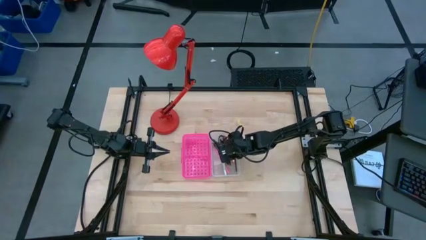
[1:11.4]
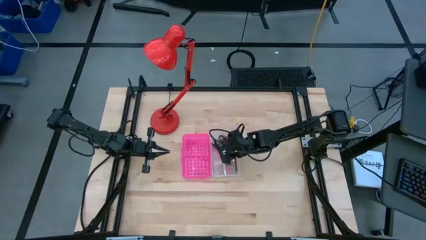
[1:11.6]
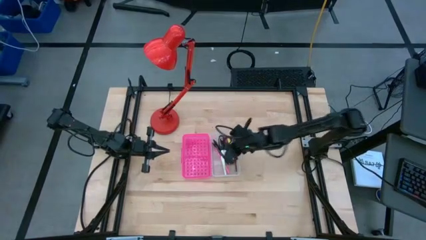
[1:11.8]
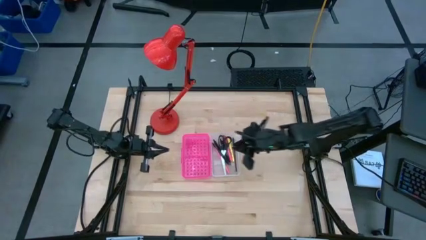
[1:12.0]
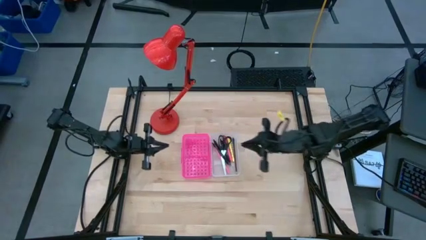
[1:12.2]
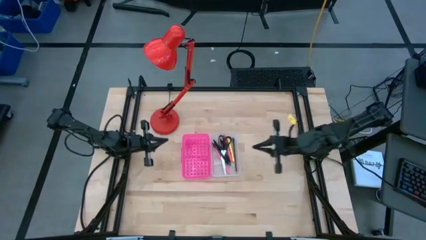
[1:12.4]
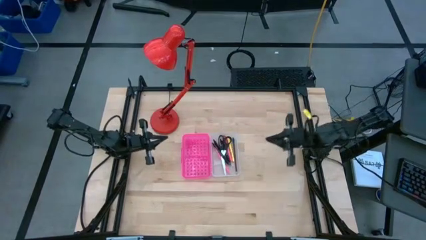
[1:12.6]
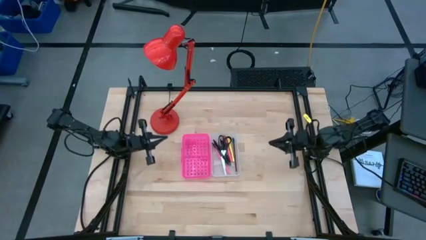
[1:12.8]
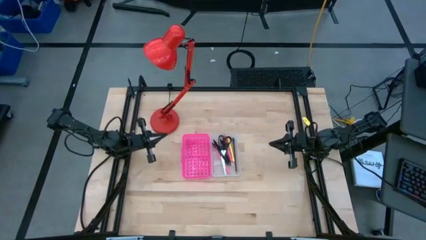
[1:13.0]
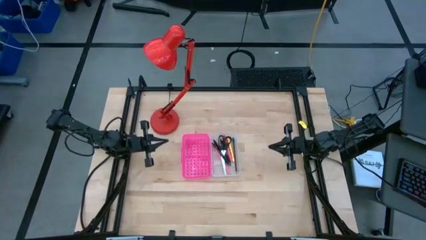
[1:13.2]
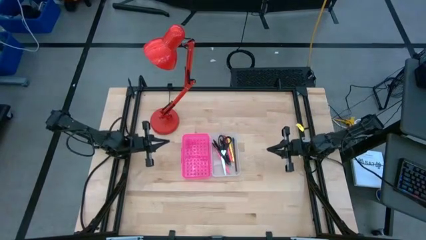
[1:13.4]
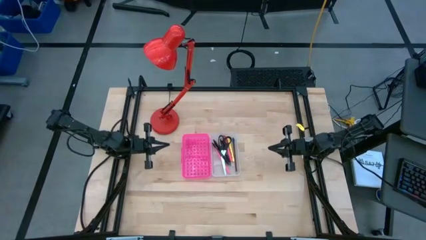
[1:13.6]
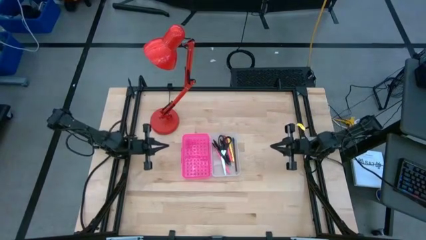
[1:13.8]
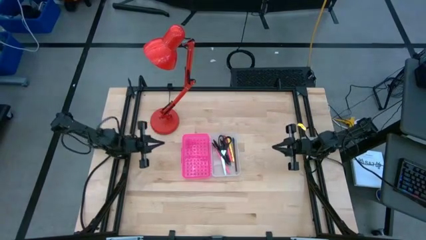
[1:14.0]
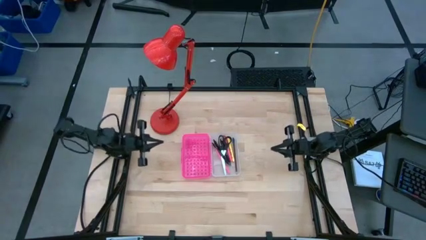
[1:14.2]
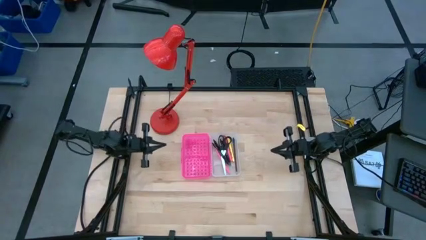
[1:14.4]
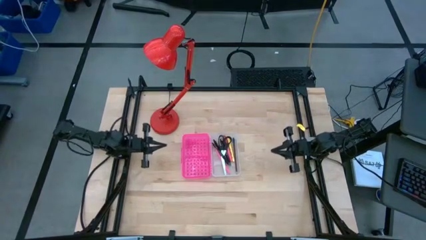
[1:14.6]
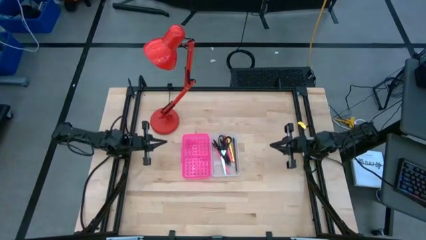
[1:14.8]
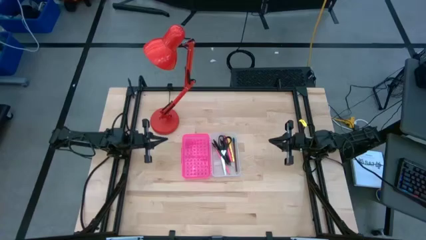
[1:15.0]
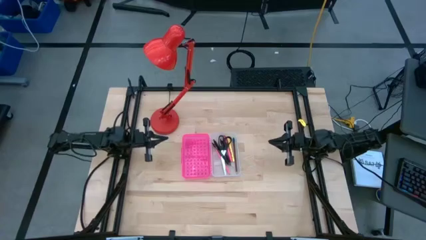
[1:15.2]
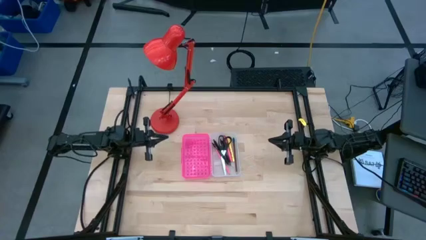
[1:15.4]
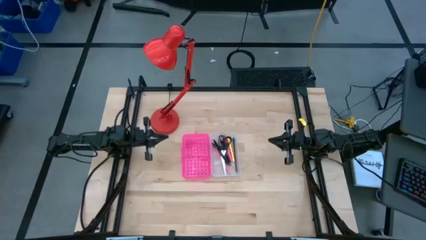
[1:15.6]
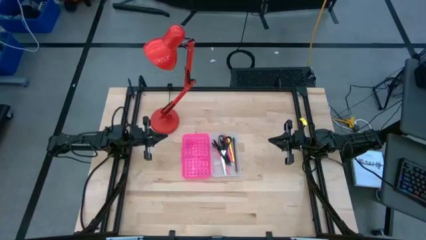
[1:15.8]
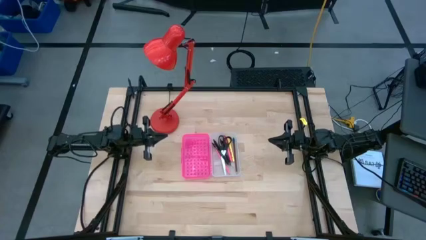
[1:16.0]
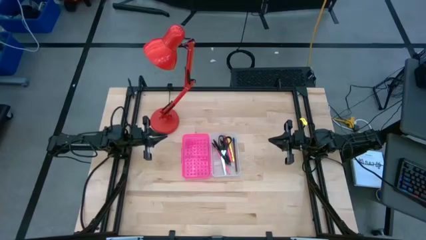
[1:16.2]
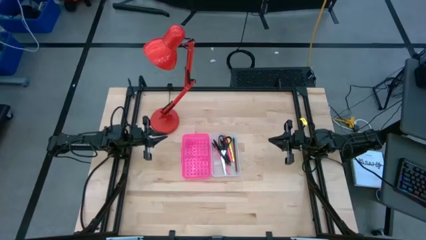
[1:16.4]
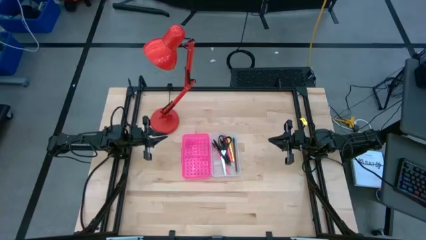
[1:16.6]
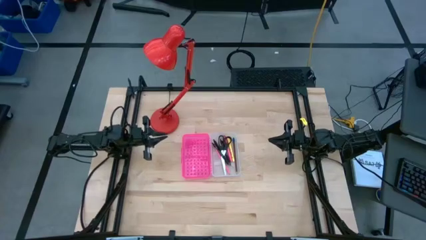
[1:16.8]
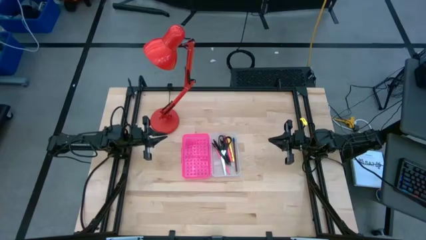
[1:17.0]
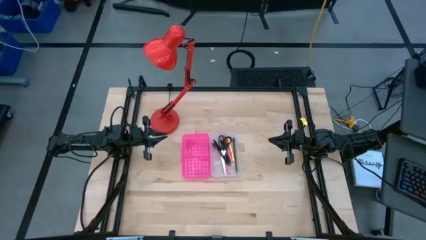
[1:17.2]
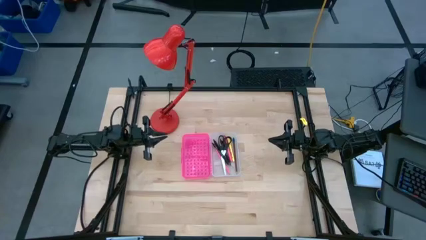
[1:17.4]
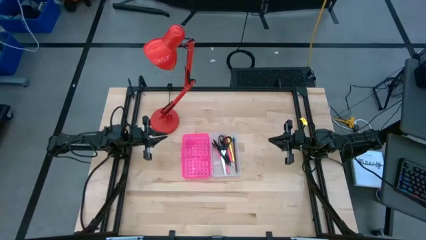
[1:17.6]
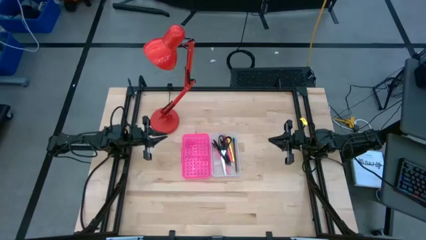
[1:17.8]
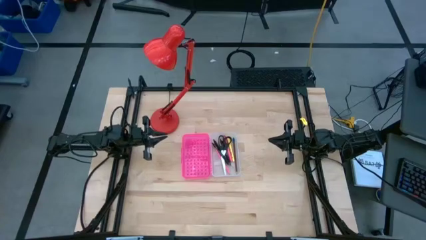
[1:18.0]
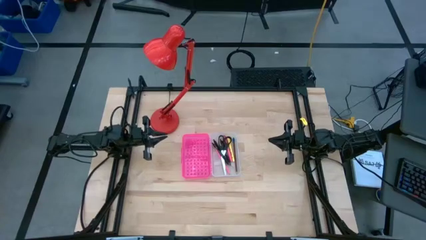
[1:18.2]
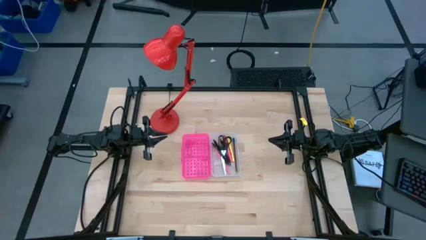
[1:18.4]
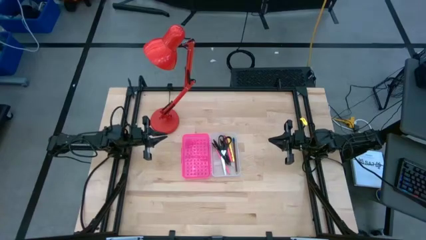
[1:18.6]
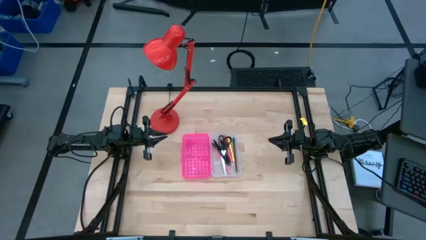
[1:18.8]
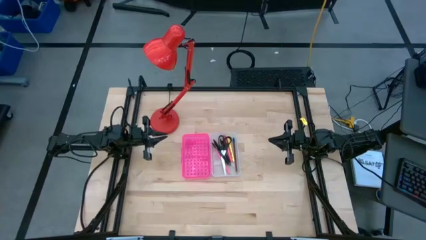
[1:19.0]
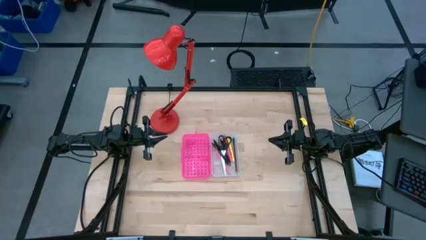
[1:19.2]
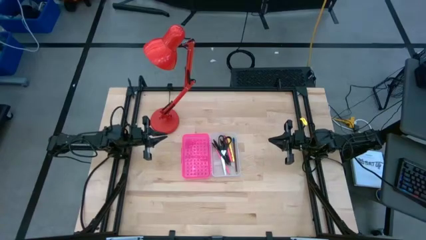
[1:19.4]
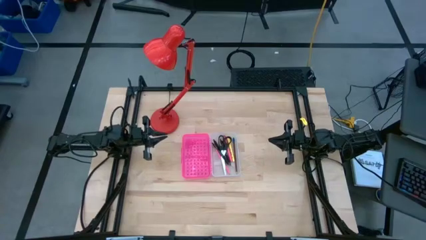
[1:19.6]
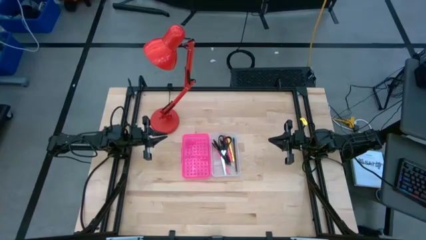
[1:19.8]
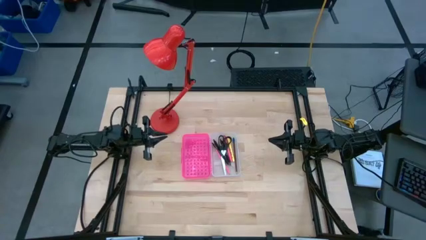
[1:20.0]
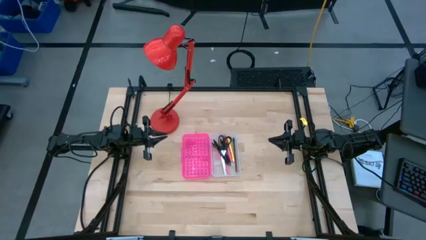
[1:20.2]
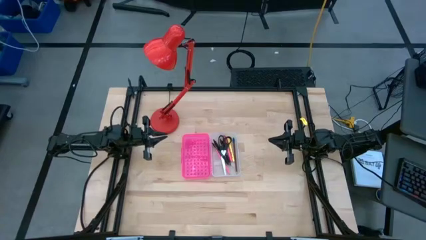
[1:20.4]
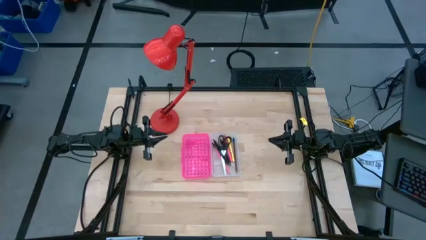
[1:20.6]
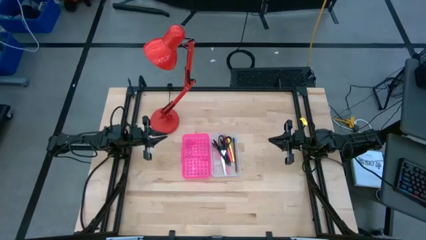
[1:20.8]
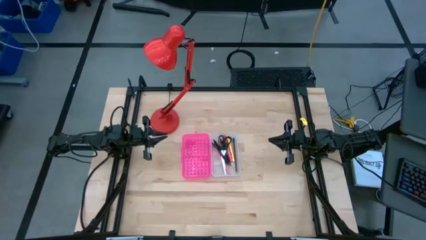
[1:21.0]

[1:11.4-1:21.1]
Task: Pick & place school supplies into a supply box
Return to Home Position
